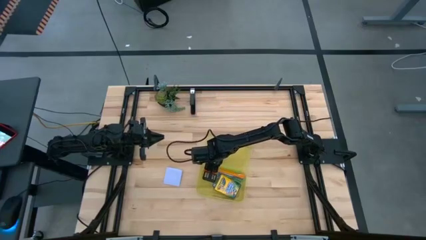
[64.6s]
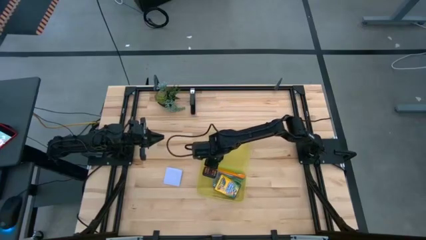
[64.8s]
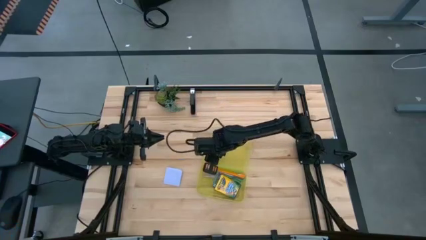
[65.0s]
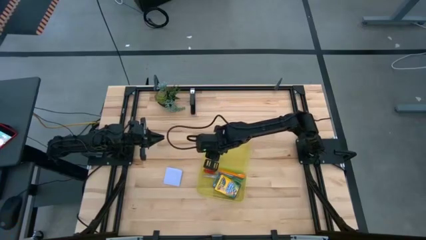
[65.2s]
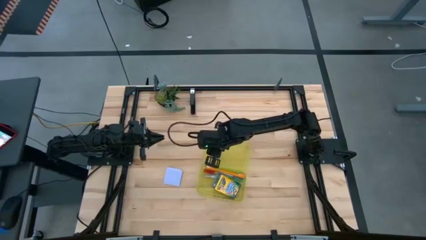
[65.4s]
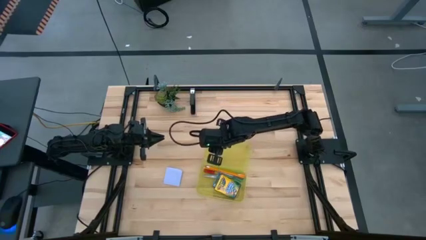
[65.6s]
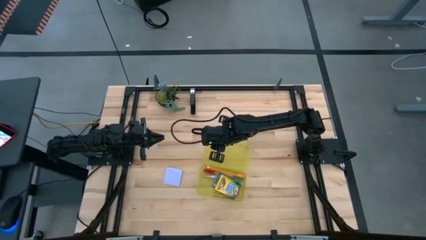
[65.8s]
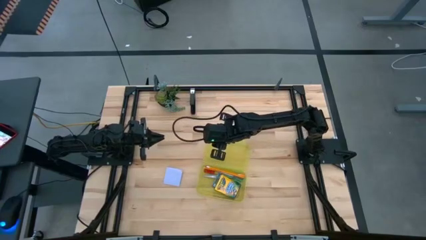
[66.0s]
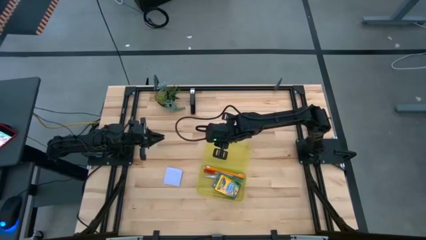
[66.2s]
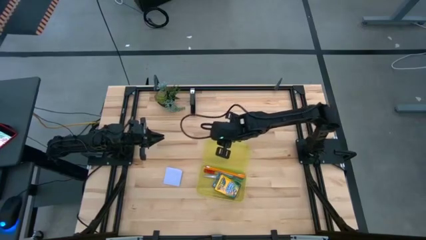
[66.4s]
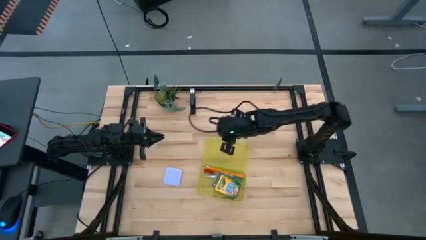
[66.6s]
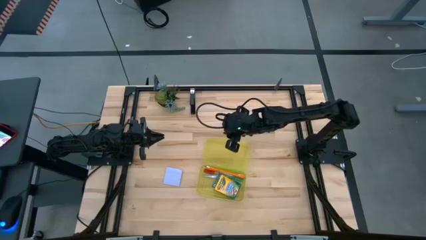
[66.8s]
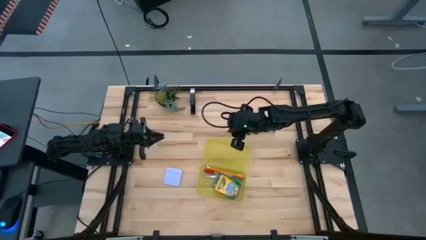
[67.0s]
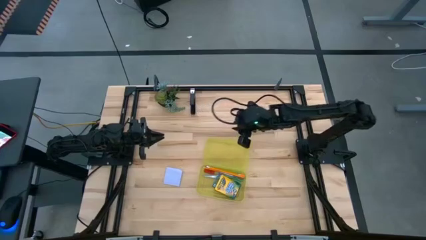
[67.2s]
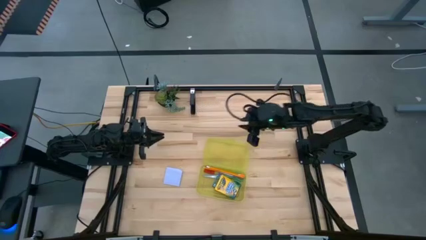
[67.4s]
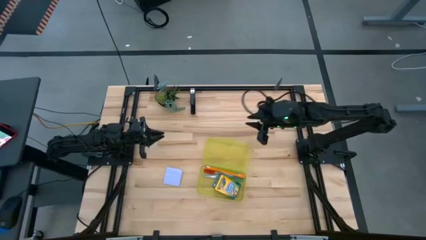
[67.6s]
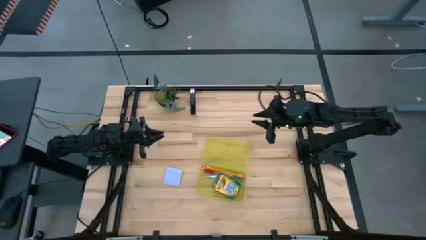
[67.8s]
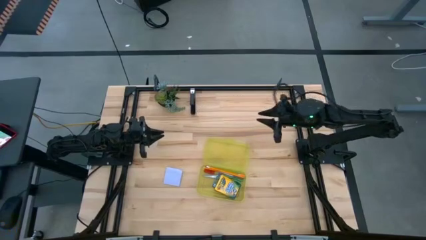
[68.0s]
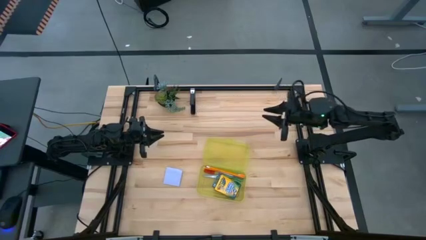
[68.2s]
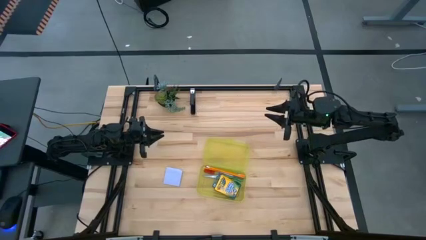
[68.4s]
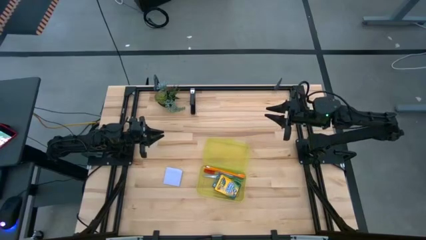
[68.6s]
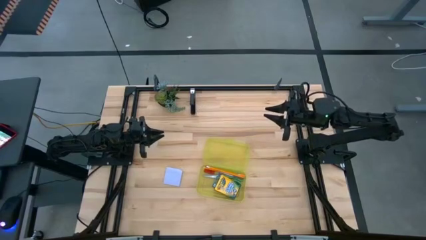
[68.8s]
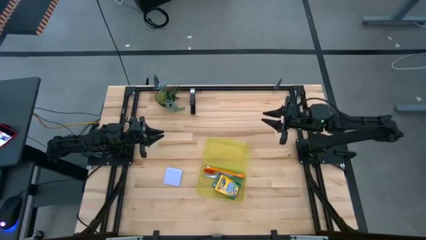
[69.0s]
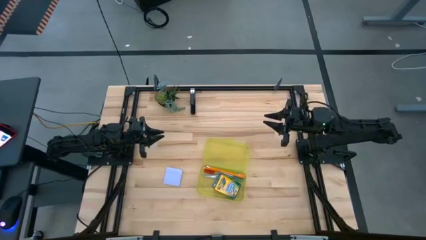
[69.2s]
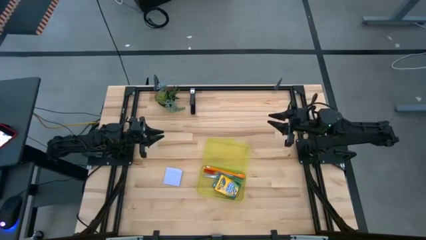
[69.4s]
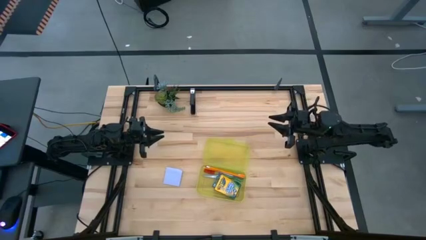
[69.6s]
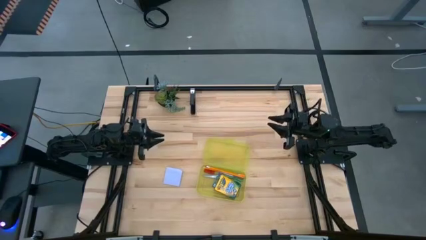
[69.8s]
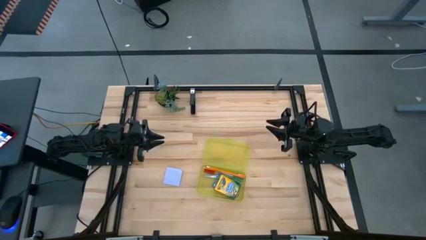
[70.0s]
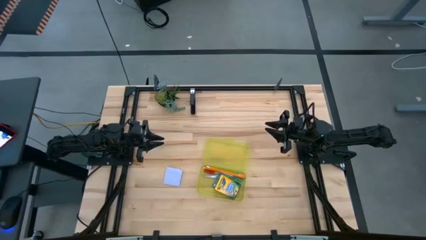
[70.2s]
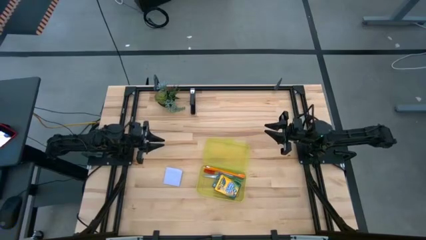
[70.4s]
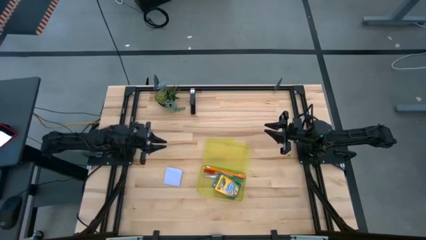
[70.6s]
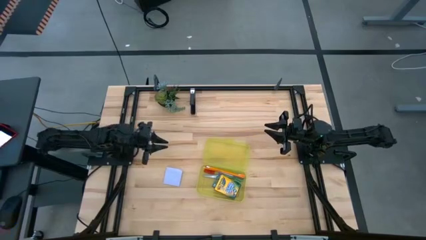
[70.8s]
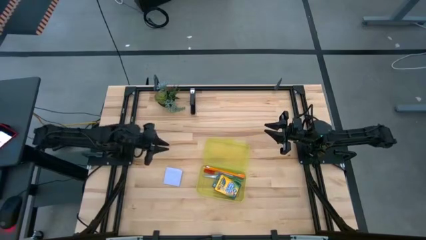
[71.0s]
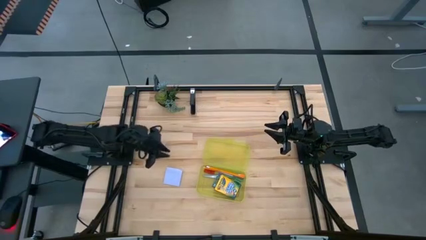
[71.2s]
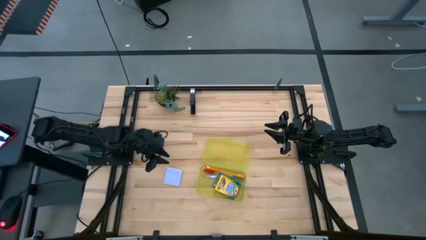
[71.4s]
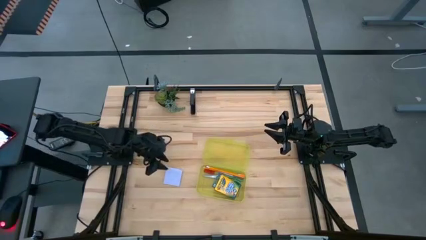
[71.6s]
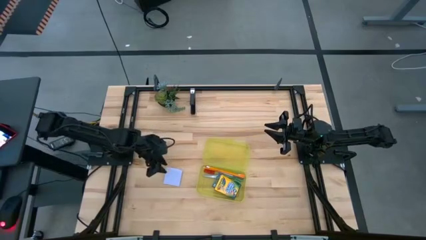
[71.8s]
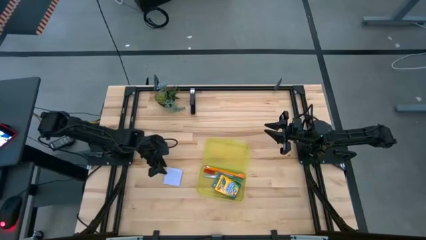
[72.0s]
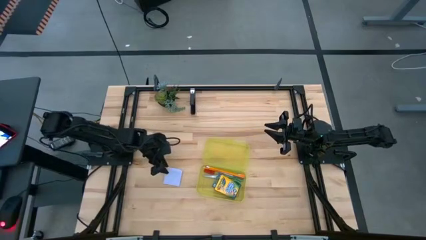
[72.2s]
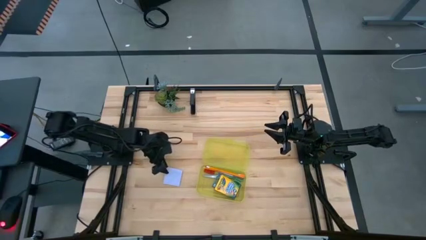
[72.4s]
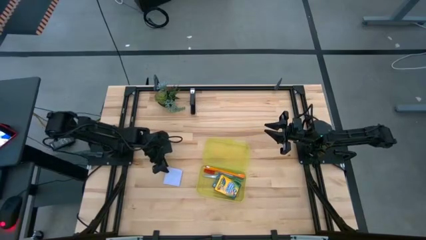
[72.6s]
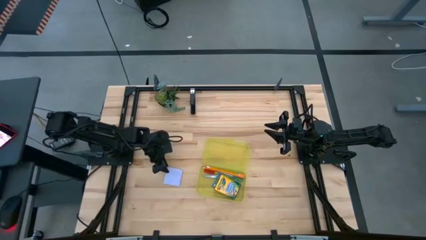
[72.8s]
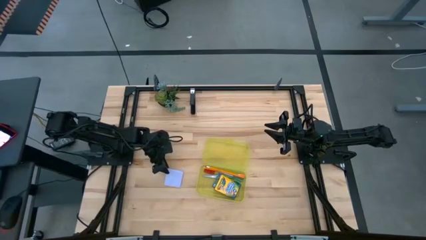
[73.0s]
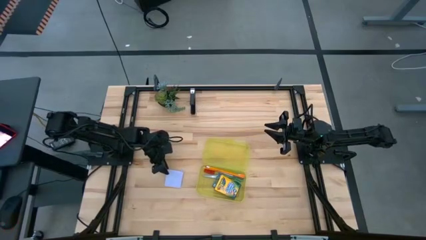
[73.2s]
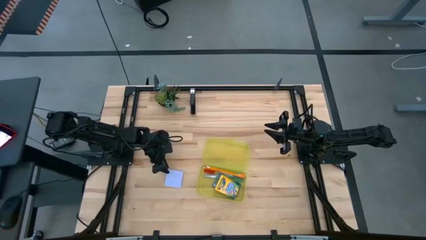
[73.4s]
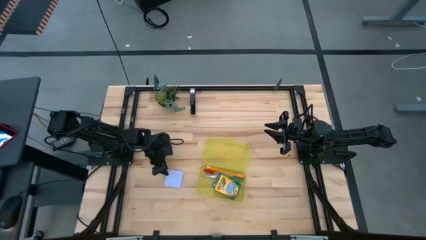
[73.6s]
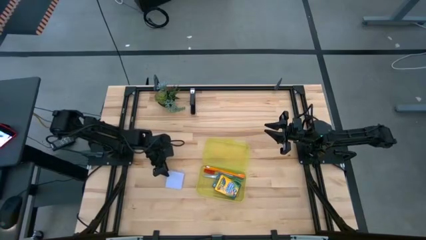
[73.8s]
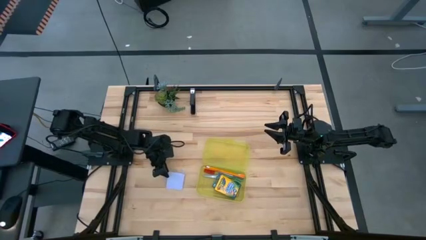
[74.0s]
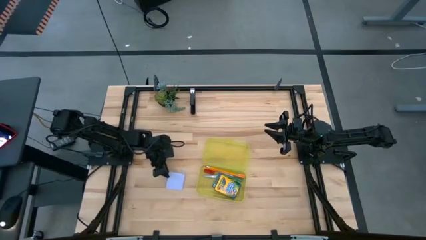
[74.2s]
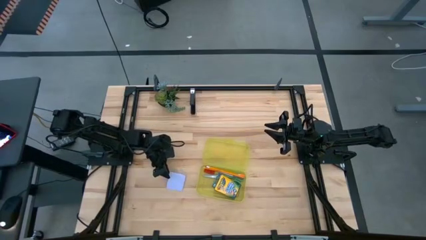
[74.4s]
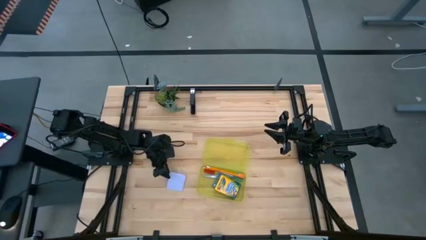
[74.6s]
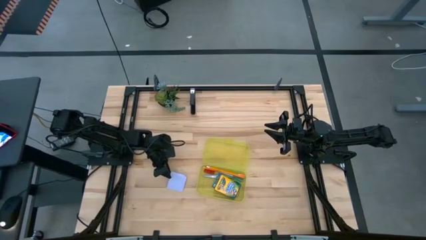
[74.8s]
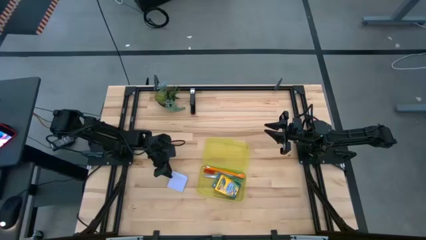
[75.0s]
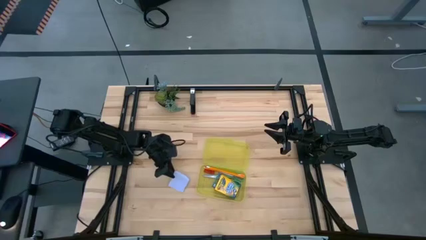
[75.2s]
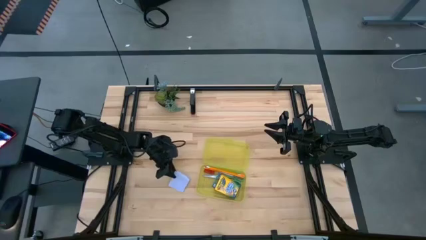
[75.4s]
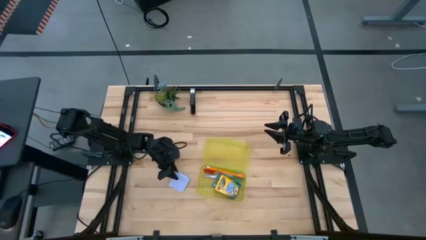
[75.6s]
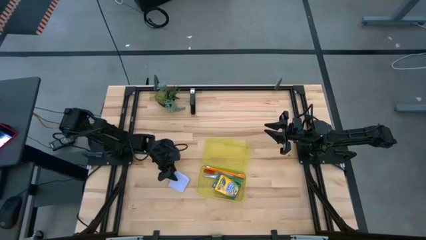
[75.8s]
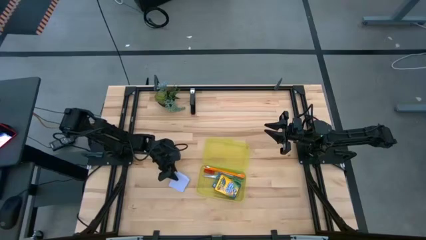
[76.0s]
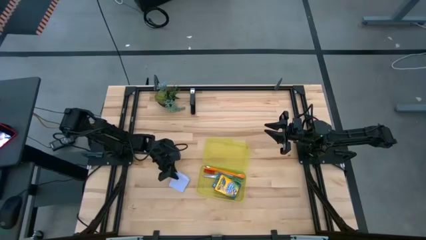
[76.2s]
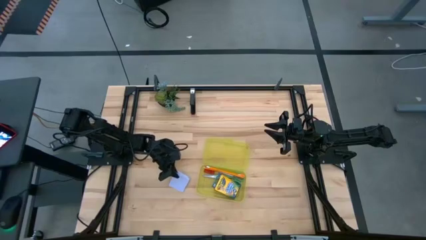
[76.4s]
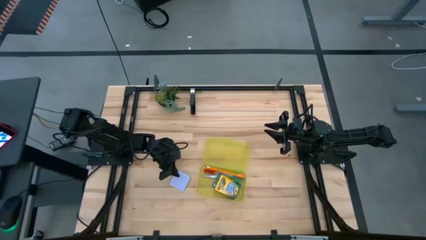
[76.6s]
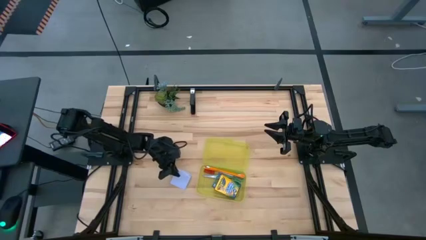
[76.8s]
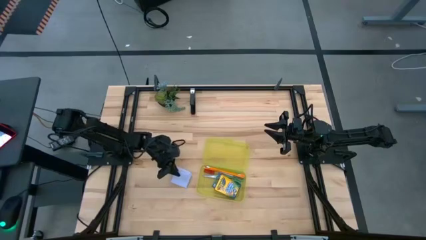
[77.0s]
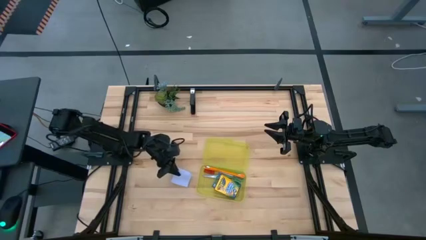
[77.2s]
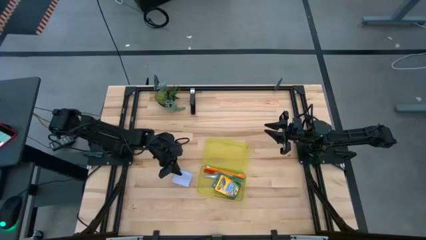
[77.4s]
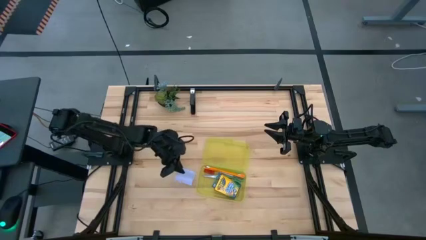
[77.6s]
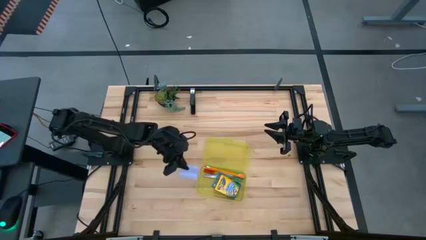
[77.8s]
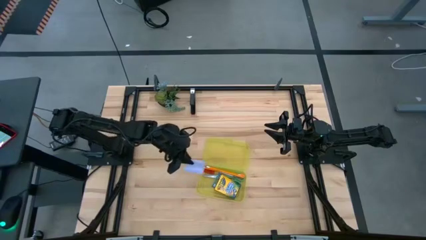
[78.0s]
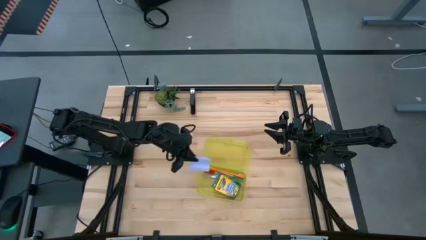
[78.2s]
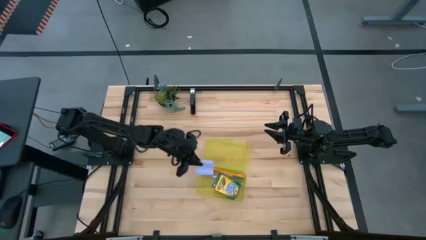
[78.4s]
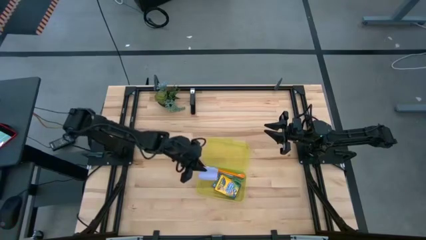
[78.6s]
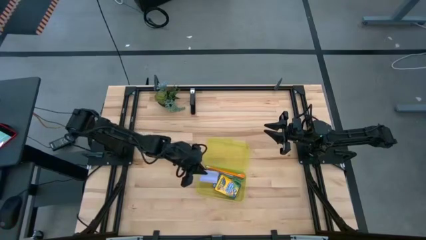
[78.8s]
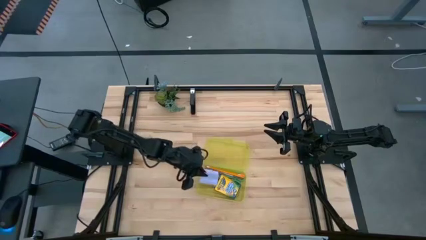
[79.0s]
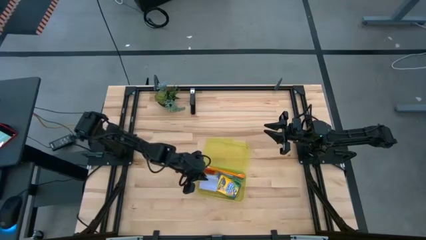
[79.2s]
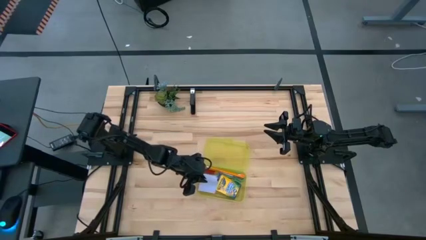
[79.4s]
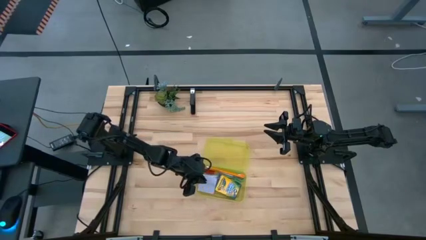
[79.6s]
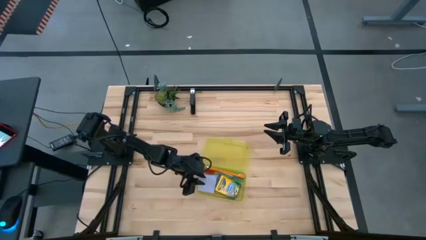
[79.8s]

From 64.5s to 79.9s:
Task: Pack school essentials
Put the white sticky note into the yellow supply box
